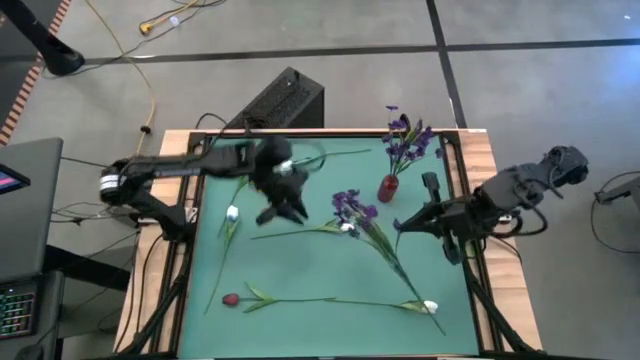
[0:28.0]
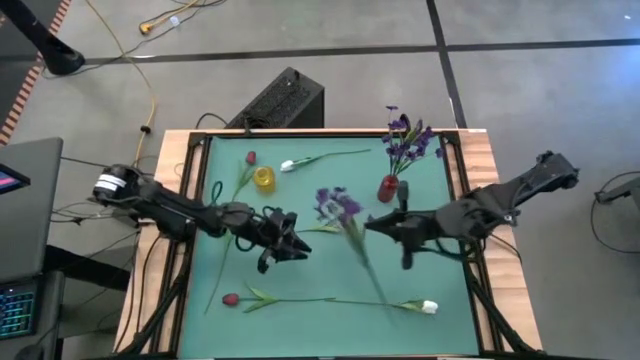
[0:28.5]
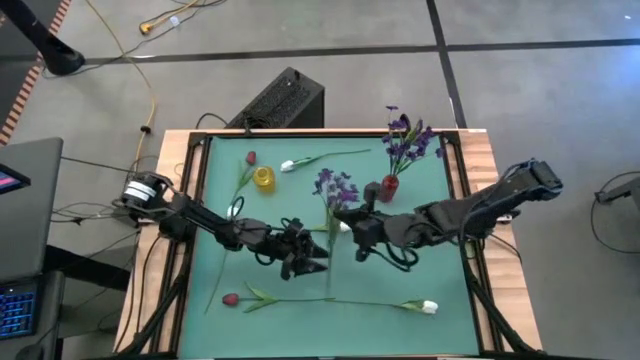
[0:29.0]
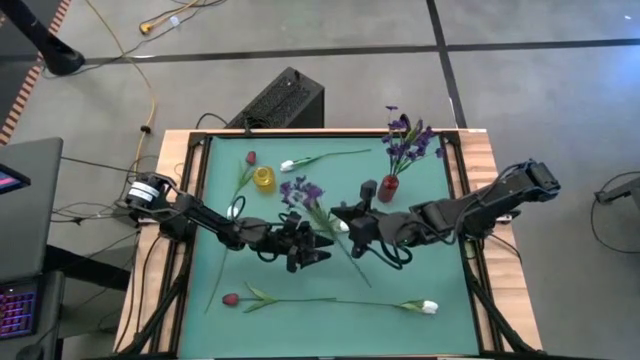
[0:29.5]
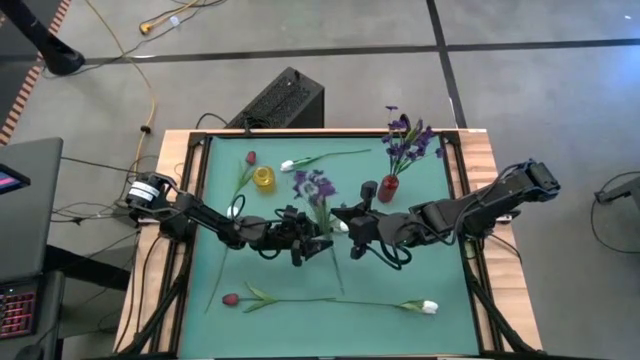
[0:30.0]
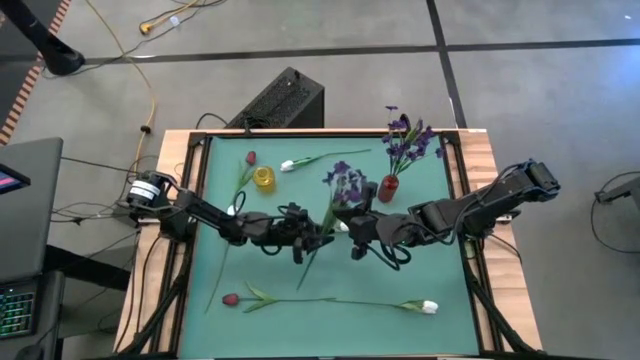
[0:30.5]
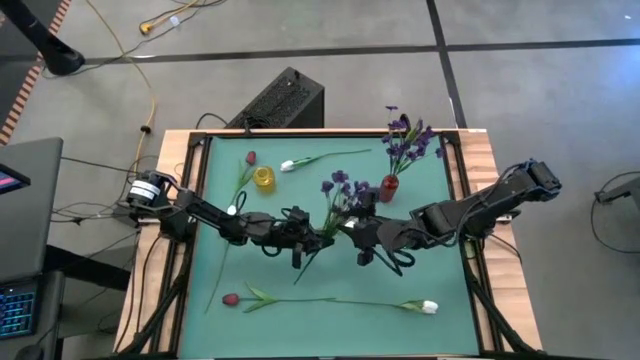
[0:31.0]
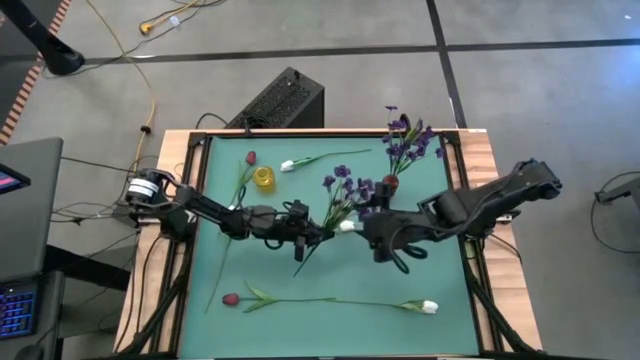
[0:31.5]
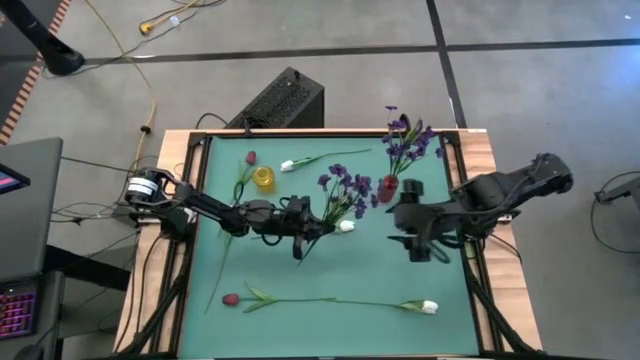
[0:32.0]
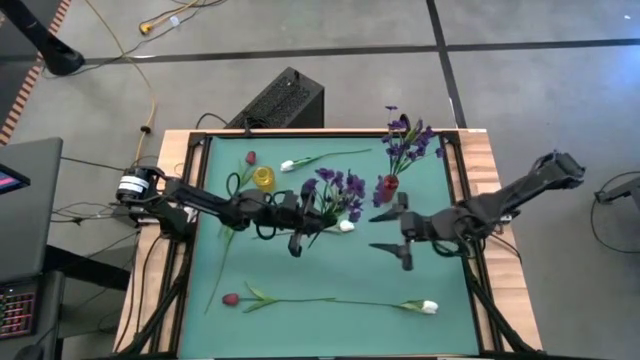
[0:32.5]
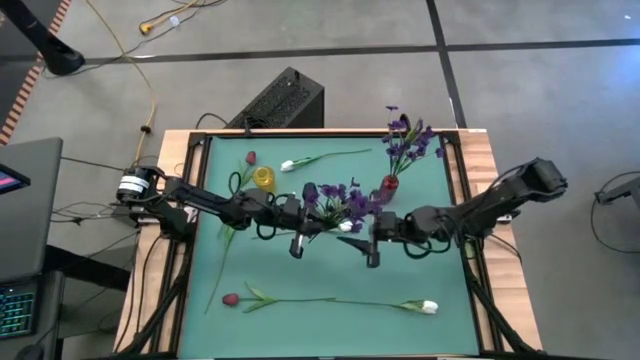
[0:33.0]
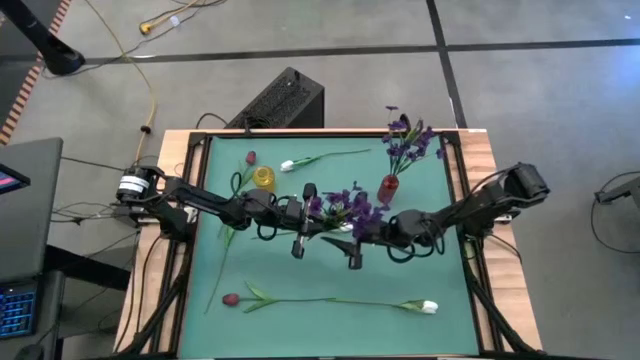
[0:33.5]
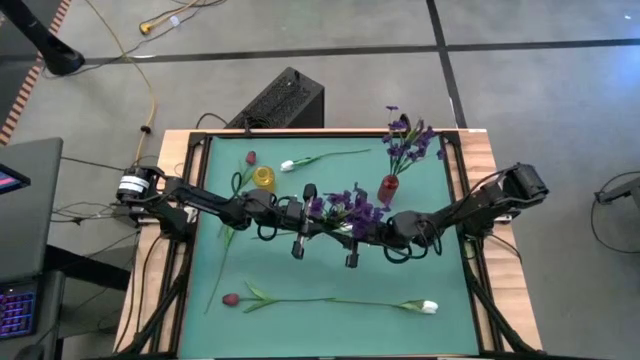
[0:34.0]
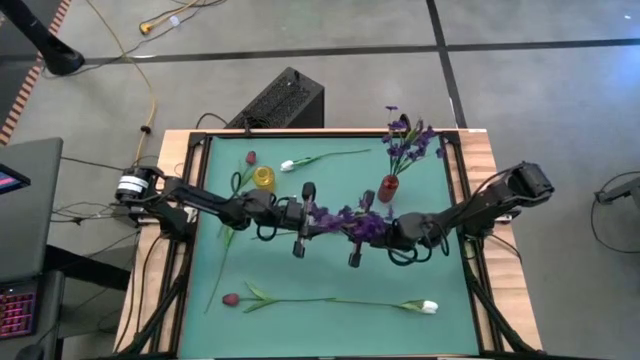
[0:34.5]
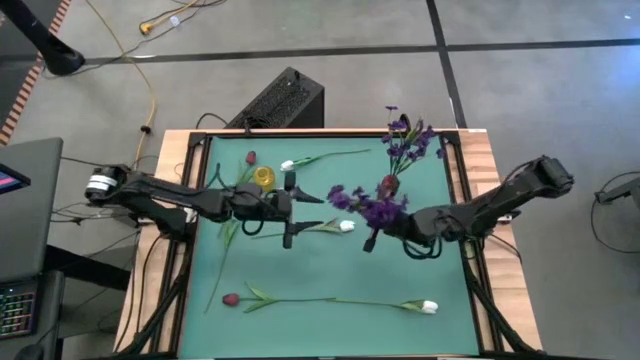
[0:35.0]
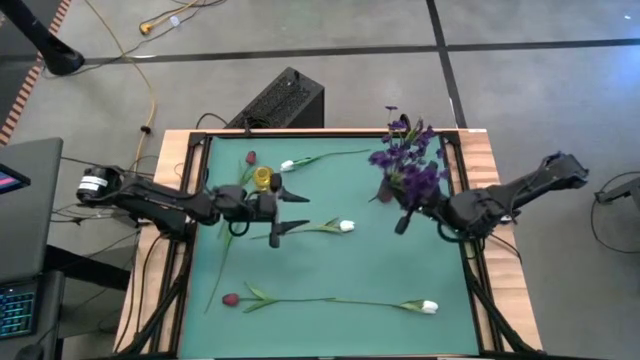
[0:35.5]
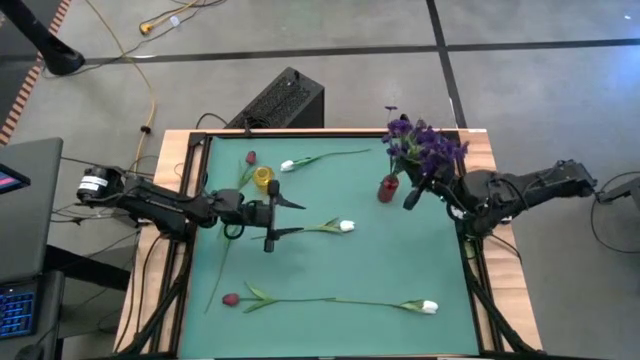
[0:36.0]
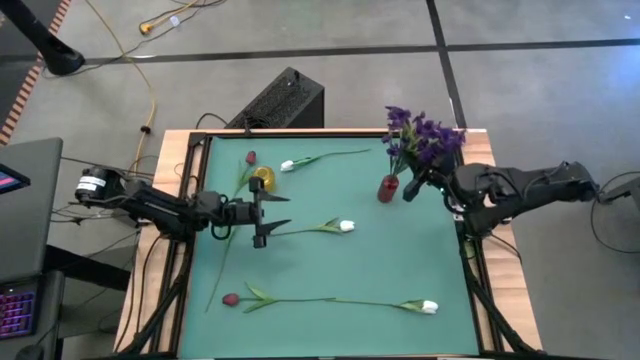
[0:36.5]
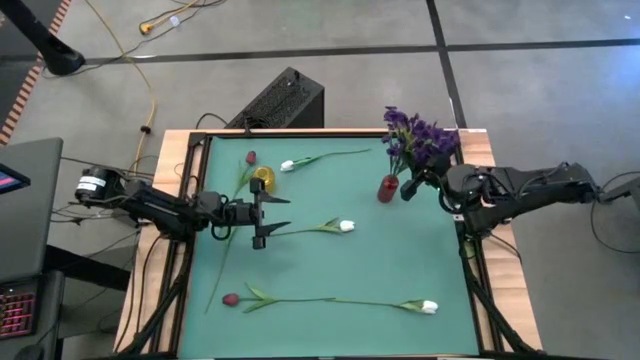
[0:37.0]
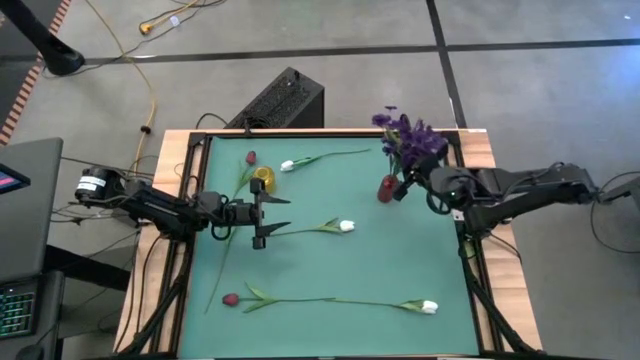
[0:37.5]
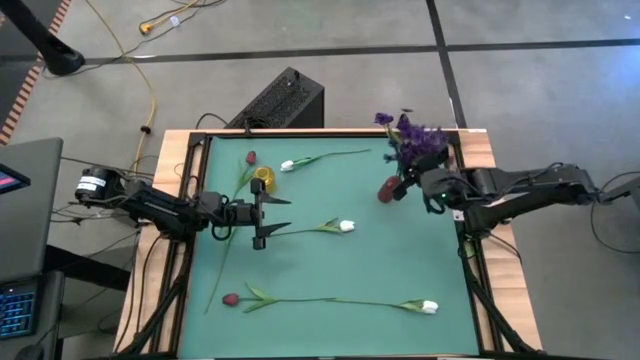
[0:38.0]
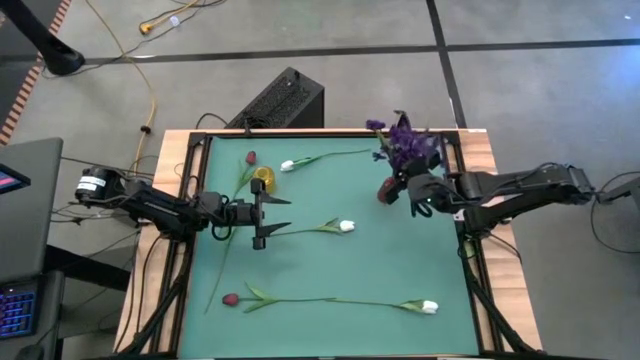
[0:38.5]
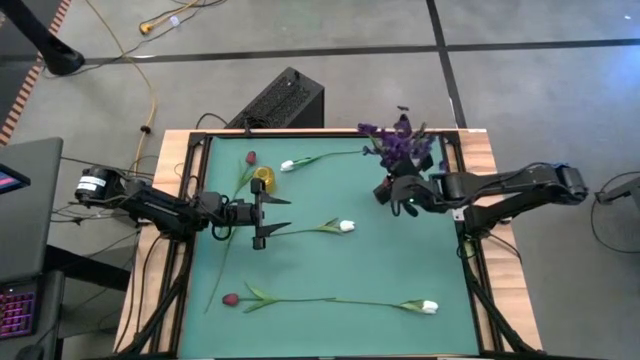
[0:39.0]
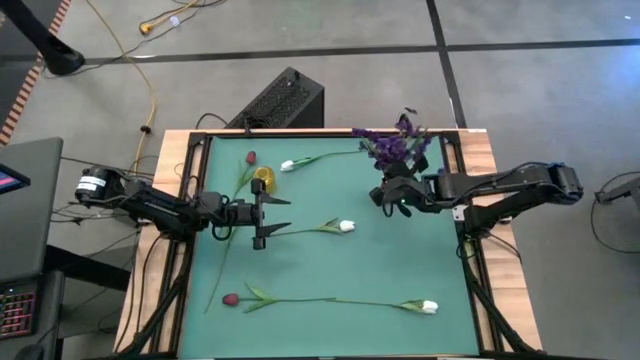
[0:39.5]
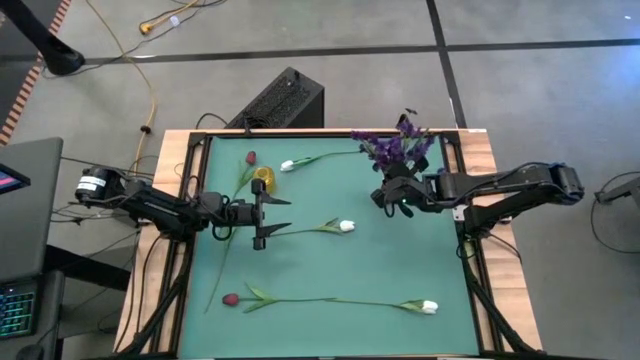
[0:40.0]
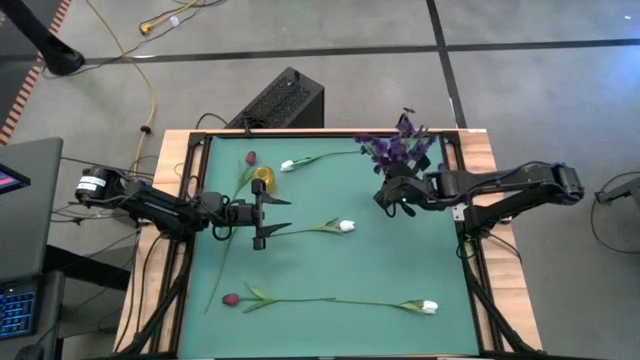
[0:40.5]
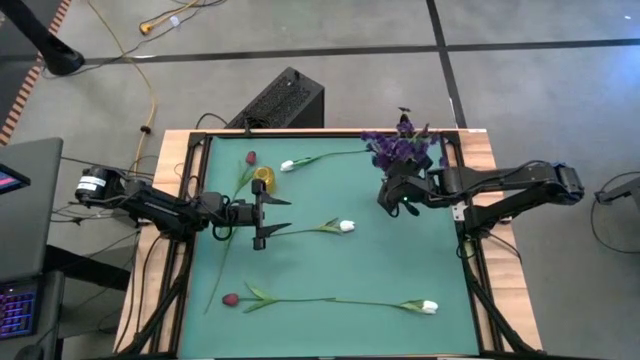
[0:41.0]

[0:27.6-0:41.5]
Task: Sort flowers into vase by color
Put the violet flowers into the red vase

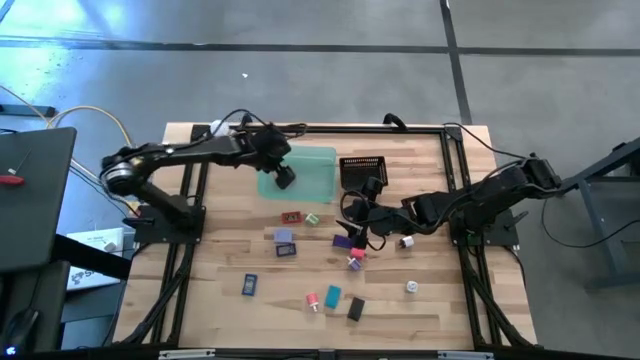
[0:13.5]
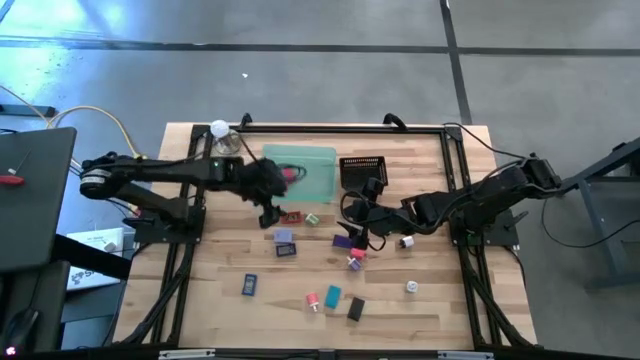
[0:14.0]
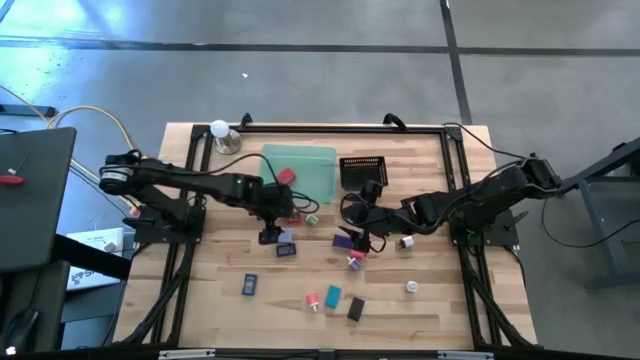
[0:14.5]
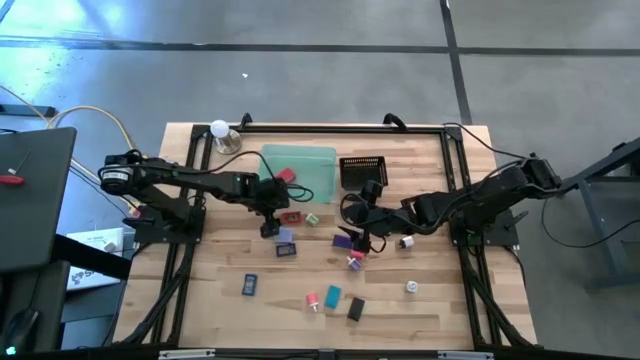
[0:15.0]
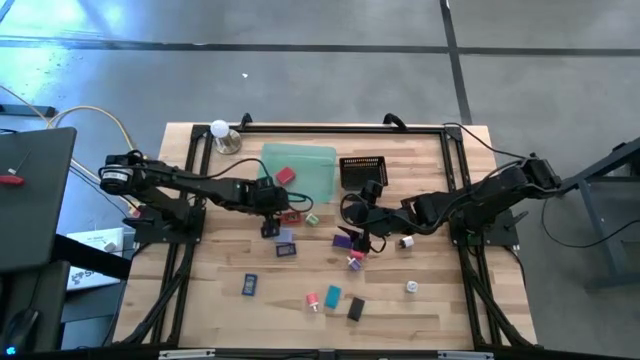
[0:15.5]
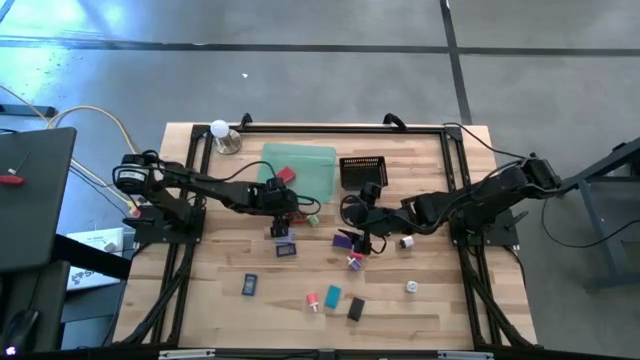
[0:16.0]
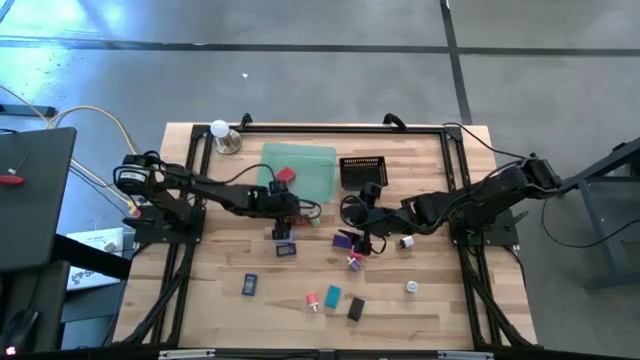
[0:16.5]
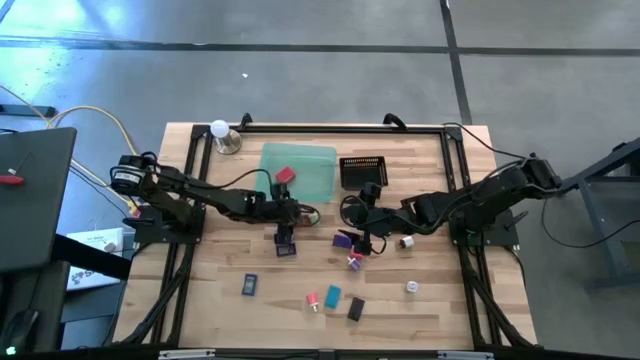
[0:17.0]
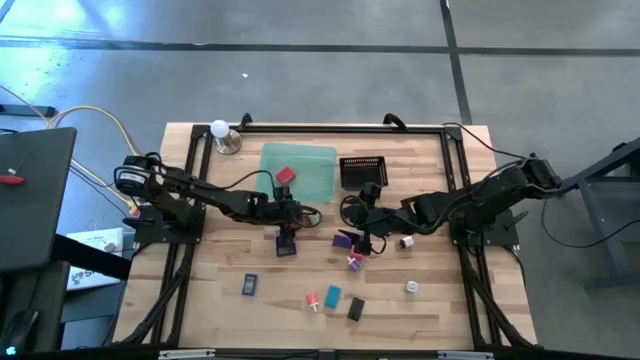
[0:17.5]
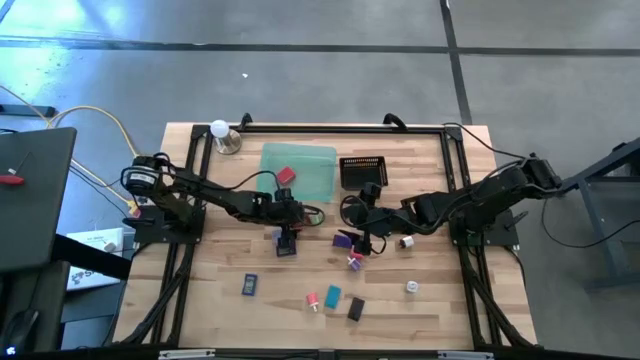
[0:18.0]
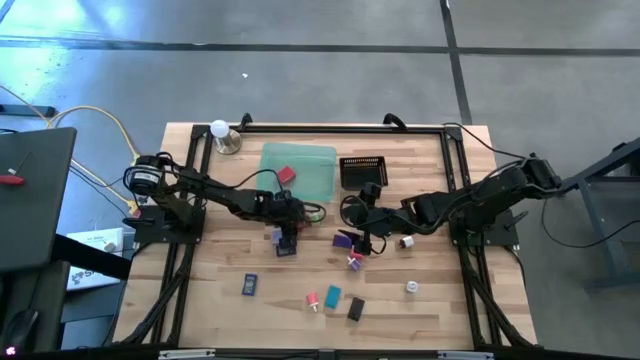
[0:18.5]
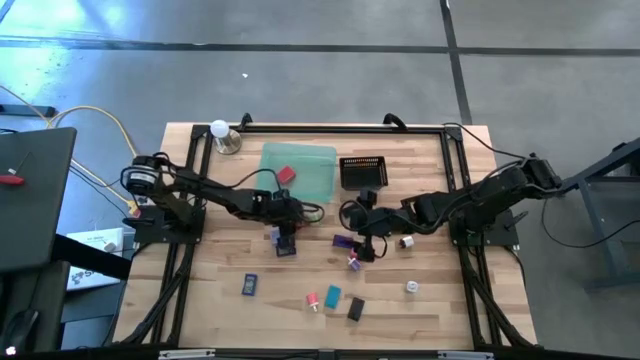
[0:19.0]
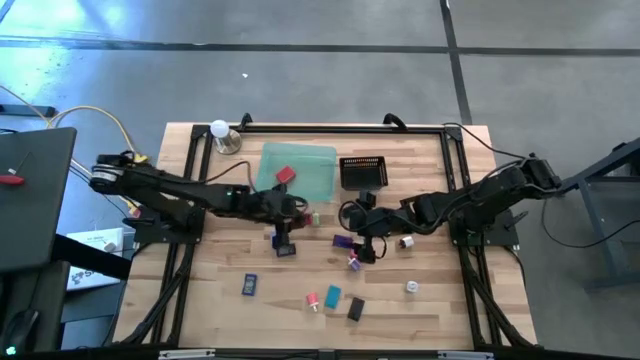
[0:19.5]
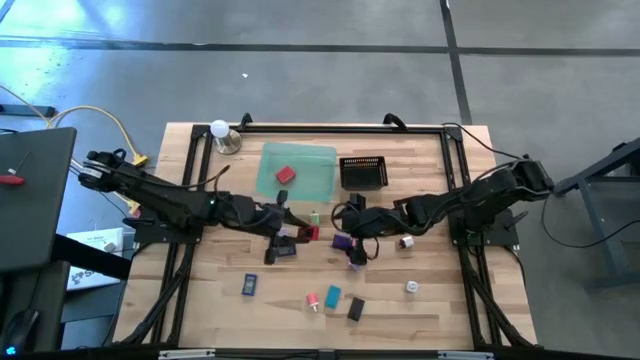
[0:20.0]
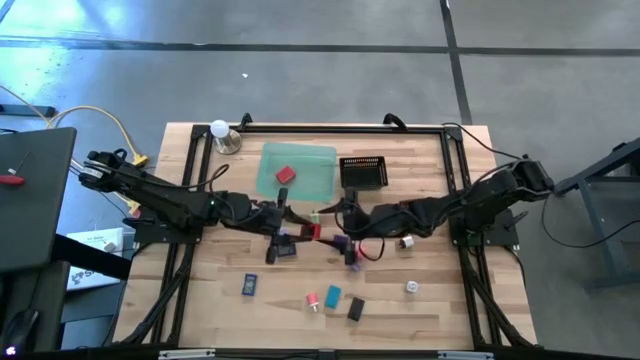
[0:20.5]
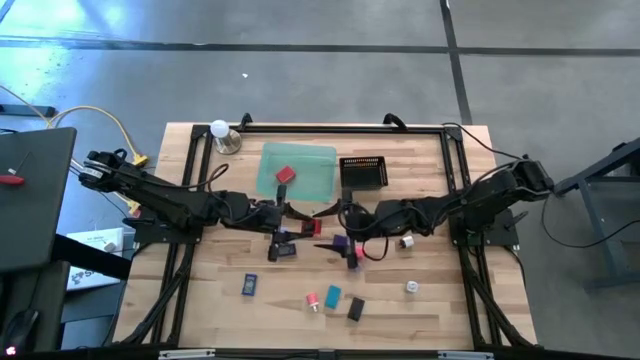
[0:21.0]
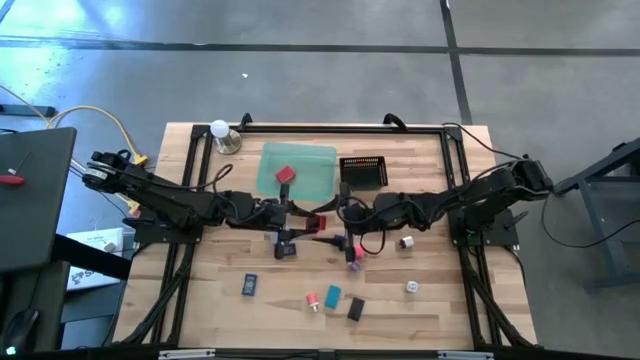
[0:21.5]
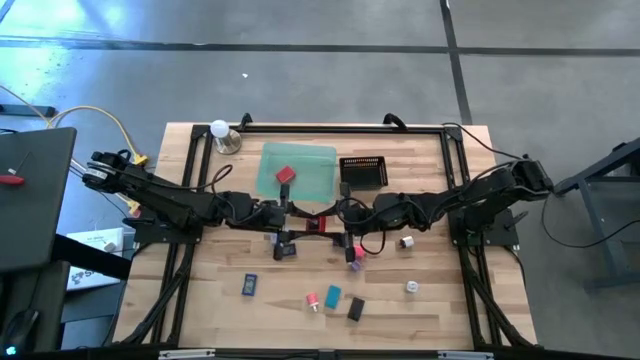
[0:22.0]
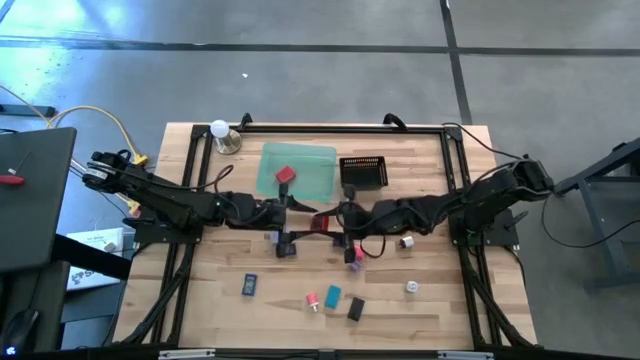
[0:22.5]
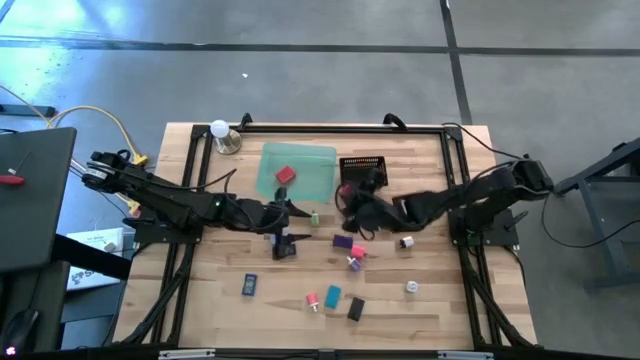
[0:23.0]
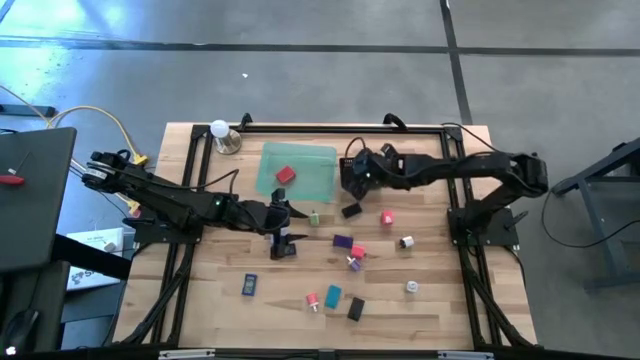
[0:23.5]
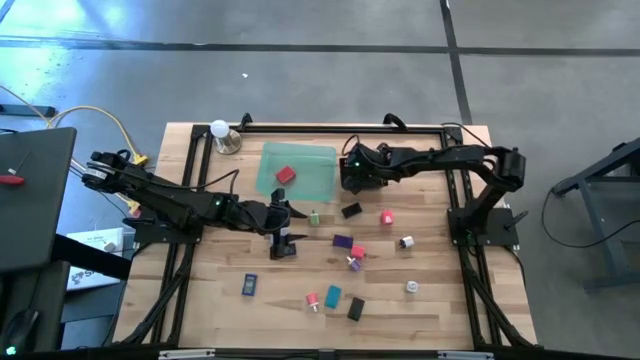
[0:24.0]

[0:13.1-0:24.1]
Task: Pick & Place Office items
Put the red digital timer into the black bin
